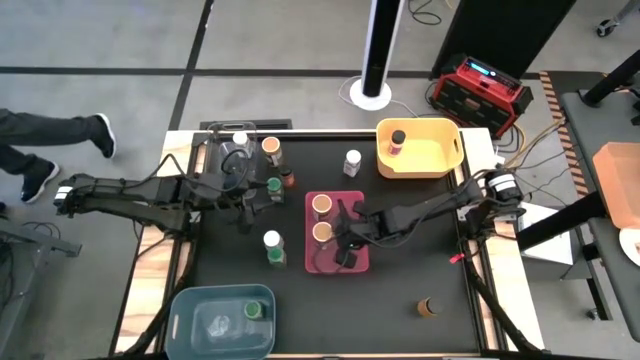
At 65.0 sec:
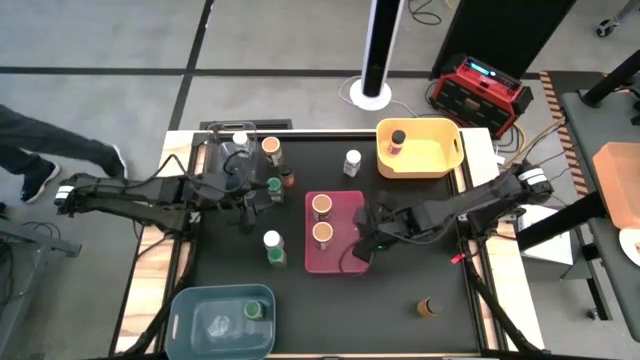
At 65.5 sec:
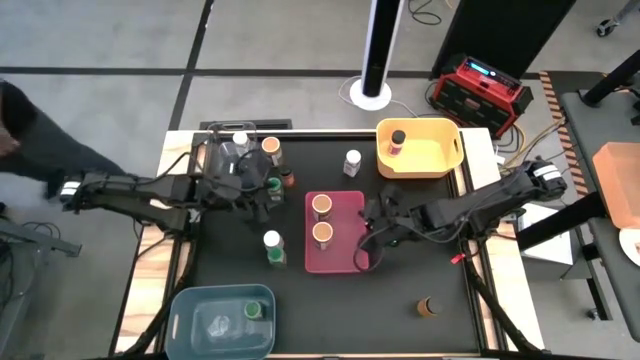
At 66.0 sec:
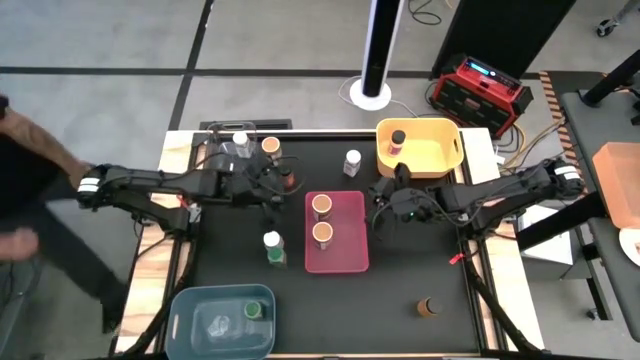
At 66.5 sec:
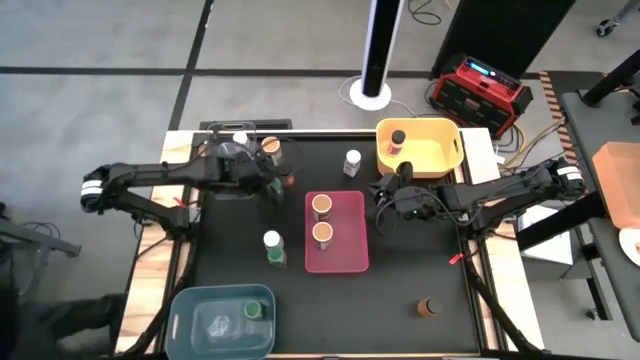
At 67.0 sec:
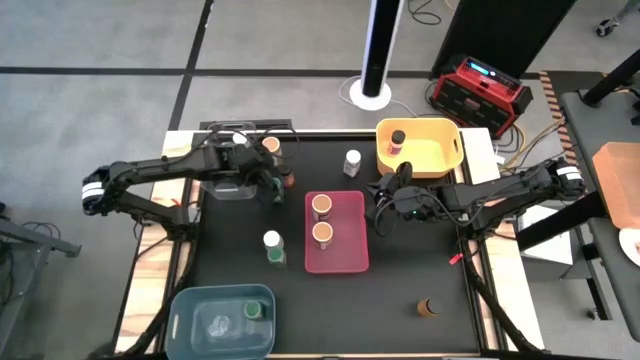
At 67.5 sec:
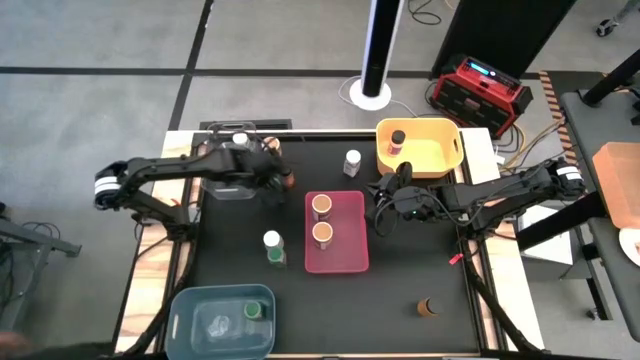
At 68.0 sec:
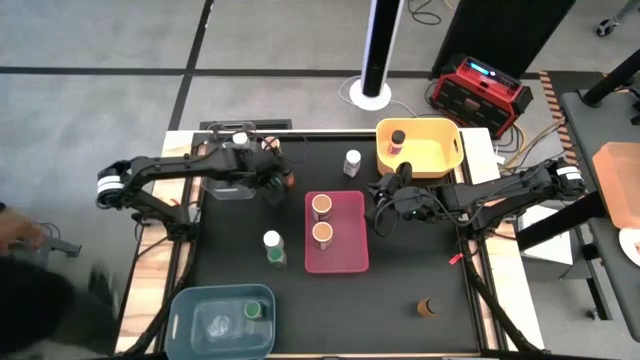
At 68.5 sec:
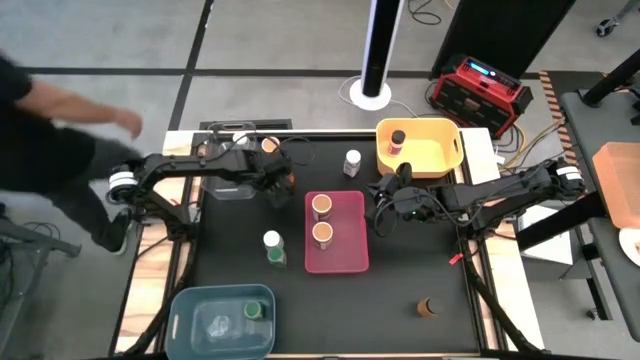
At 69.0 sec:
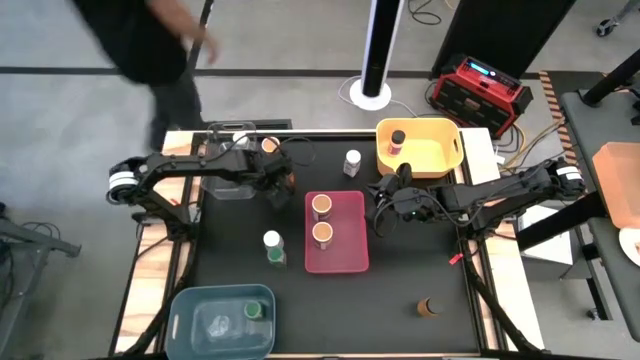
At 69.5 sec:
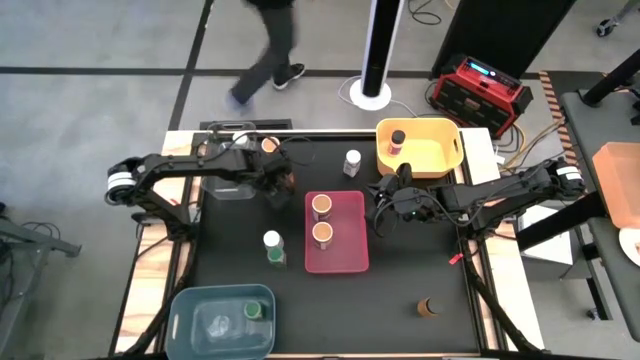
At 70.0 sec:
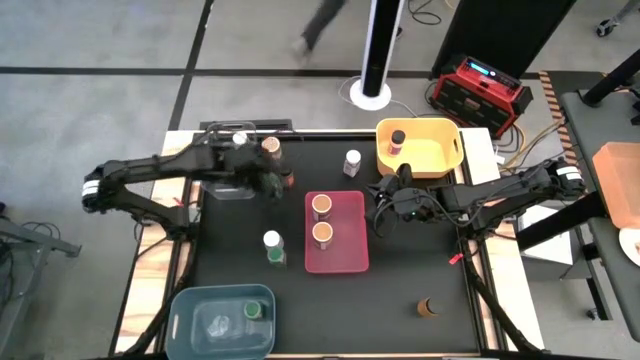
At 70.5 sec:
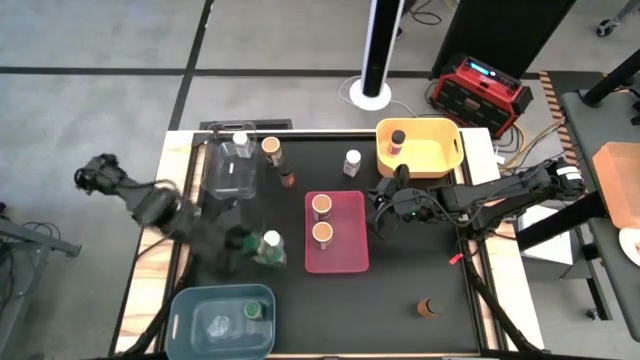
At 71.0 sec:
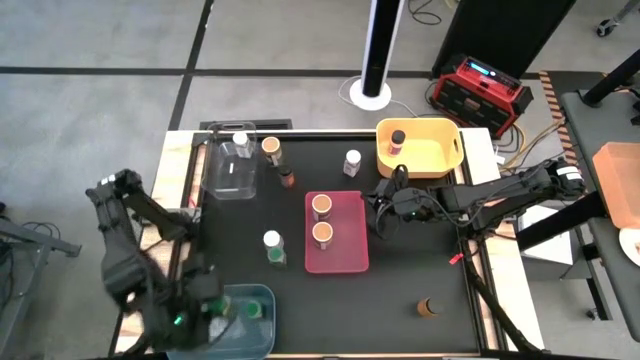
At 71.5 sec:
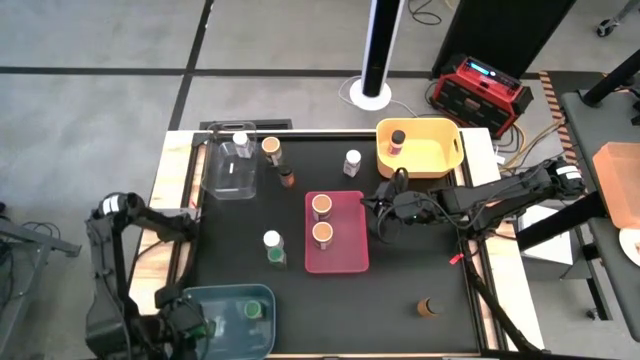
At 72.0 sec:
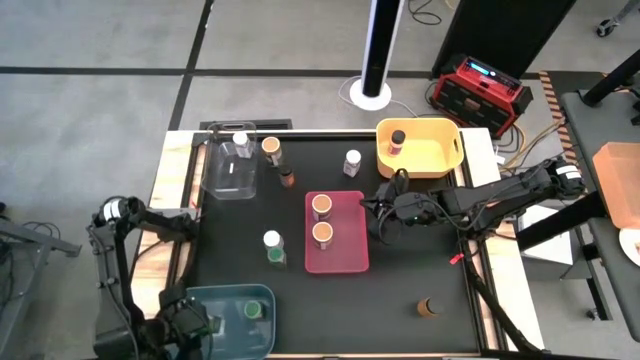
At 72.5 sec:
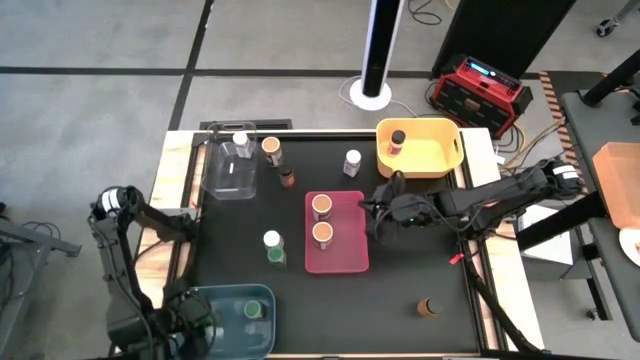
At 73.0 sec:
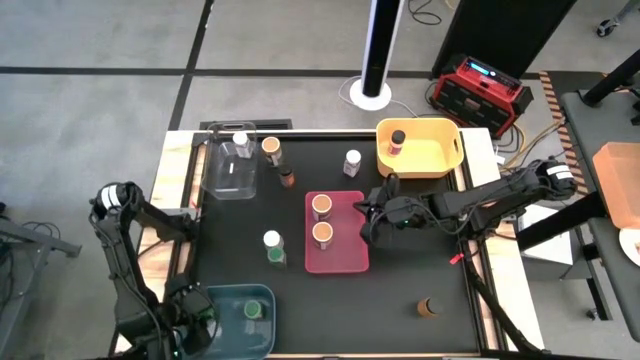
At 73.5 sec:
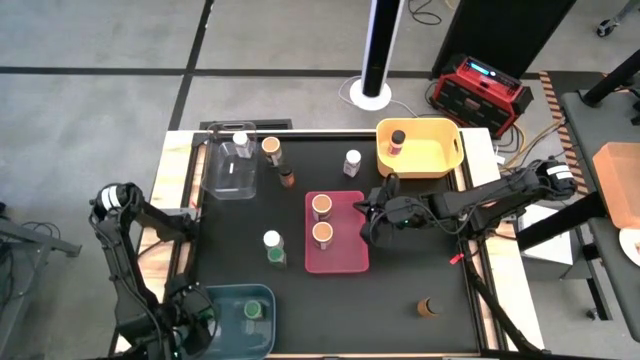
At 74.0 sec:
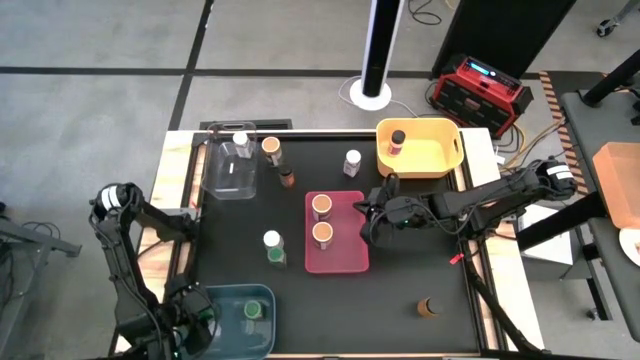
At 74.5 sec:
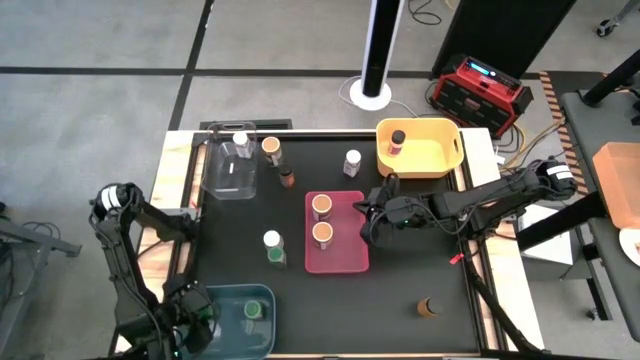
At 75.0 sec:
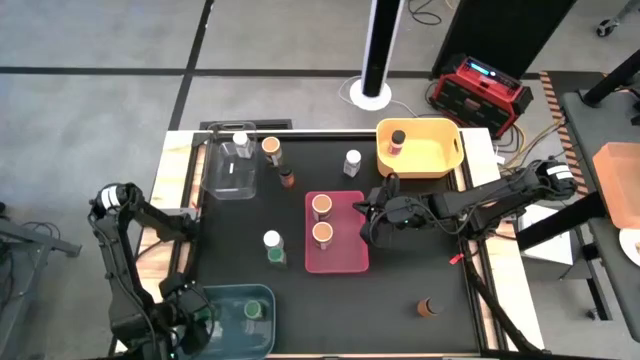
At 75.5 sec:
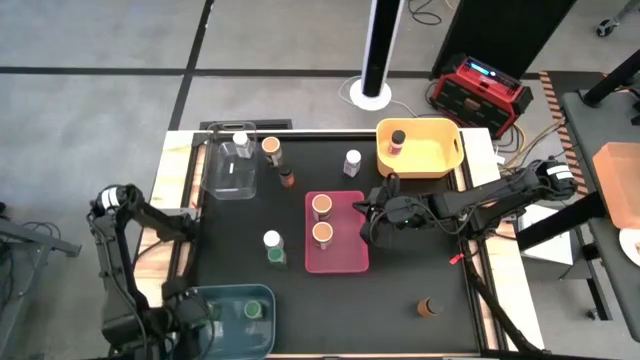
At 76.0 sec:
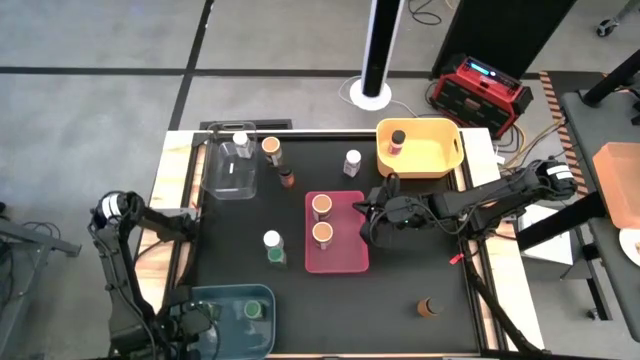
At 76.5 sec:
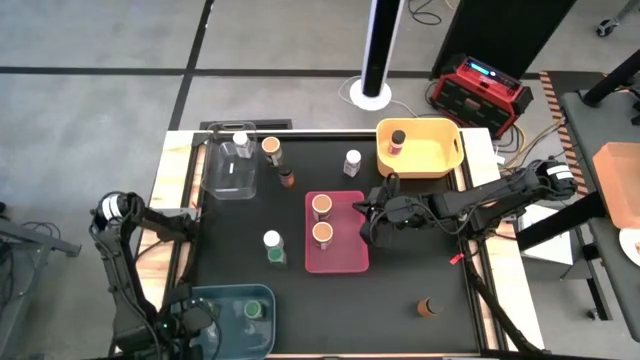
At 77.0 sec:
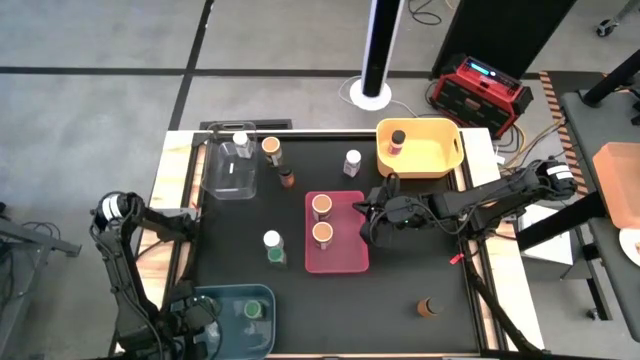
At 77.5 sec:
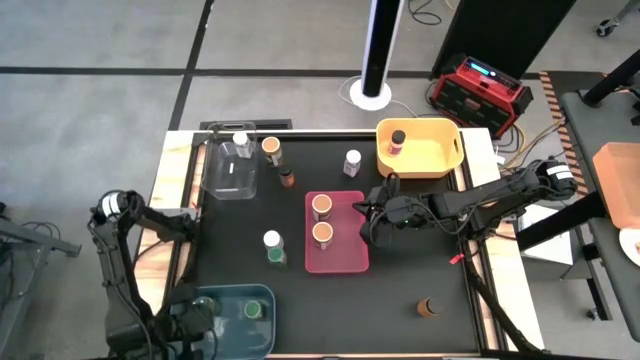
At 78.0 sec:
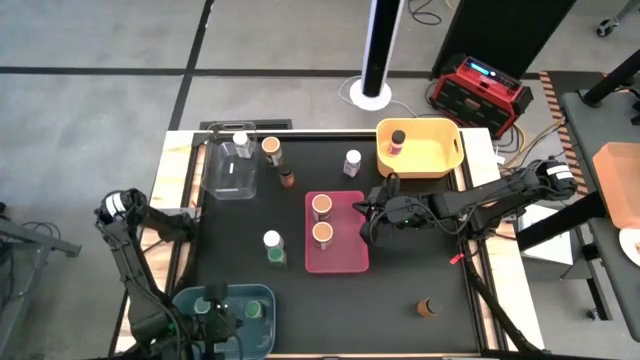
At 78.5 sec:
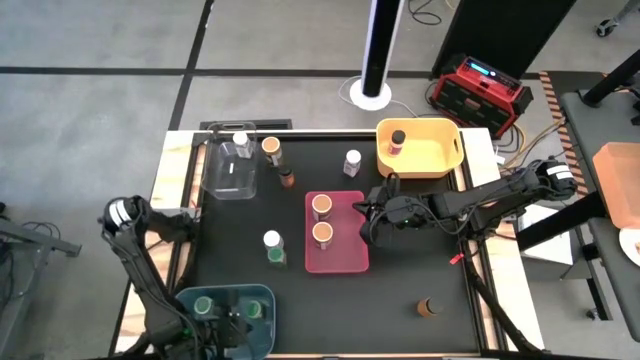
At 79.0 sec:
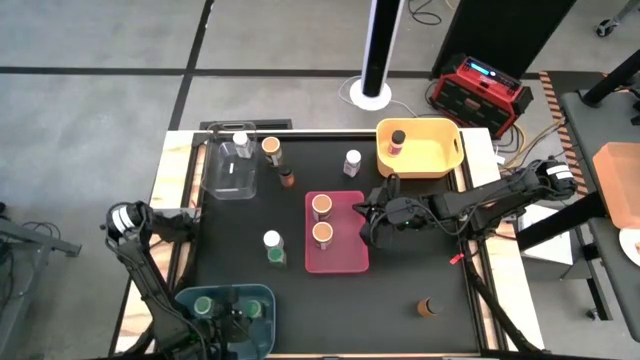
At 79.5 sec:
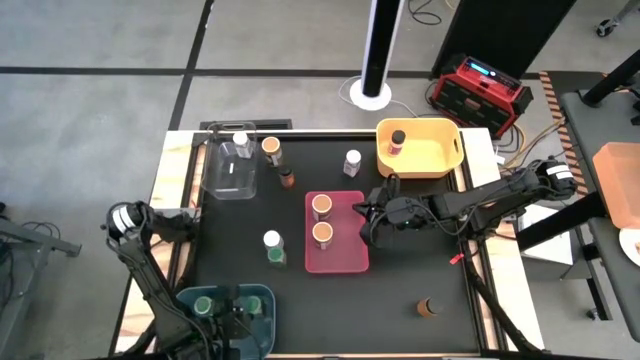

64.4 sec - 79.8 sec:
Task: Sort spices by type
Put the top green seasoning bottle into the blue bin

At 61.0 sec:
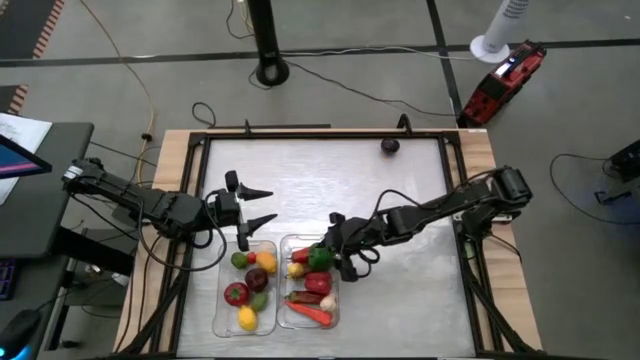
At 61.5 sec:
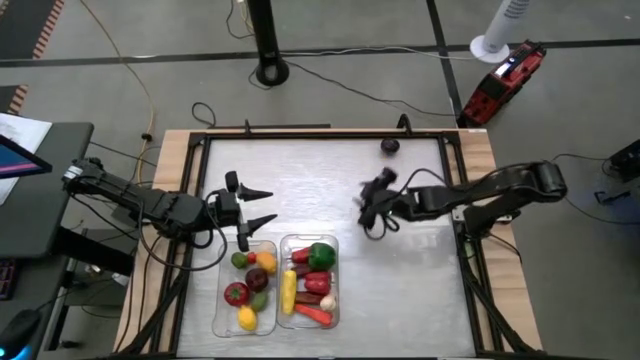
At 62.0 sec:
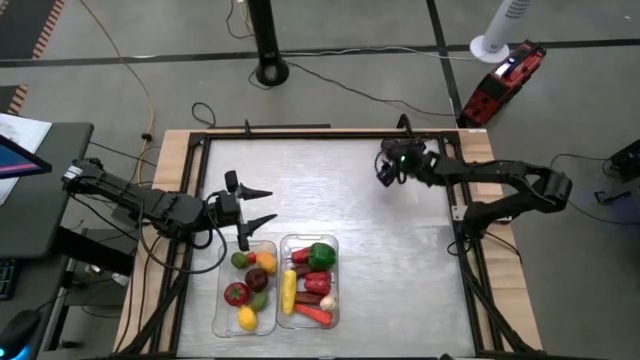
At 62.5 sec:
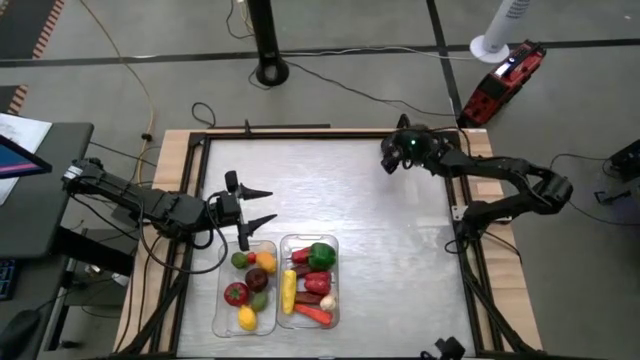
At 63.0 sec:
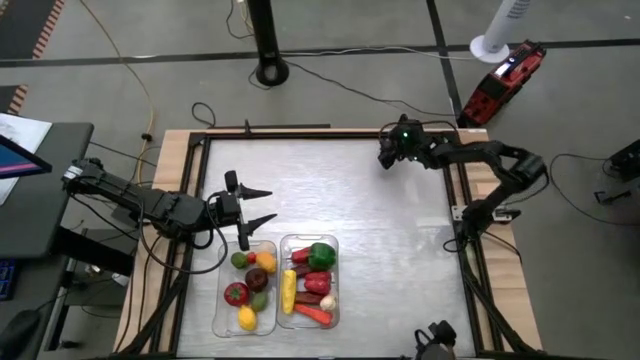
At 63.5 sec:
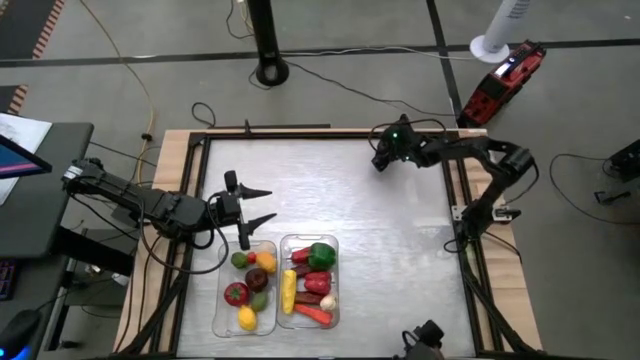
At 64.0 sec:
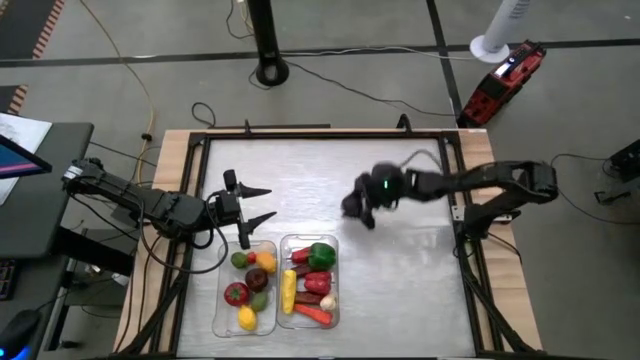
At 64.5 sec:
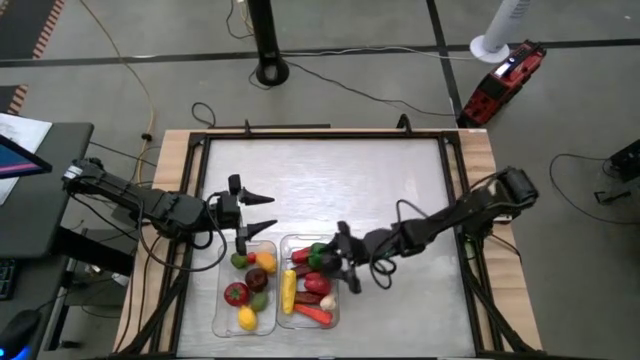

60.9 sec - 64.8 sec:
Task: Sort produce into baskets
Put the violet plum into the right transparent bin
